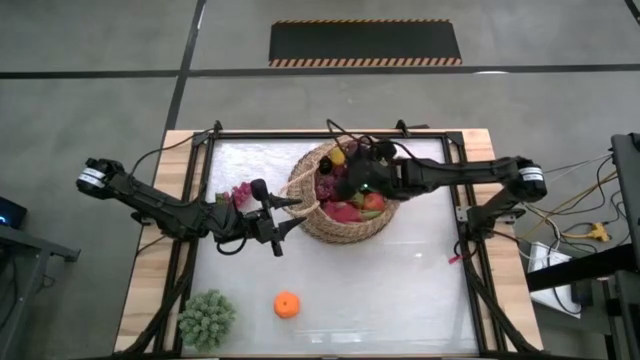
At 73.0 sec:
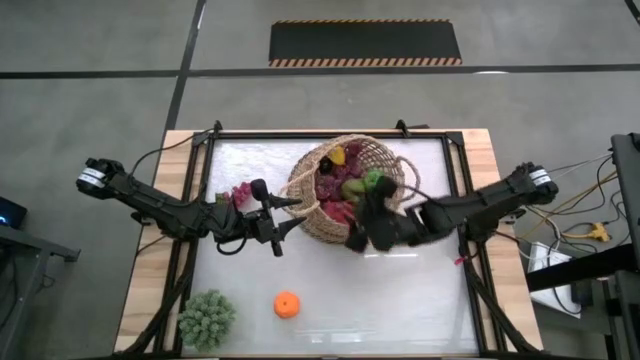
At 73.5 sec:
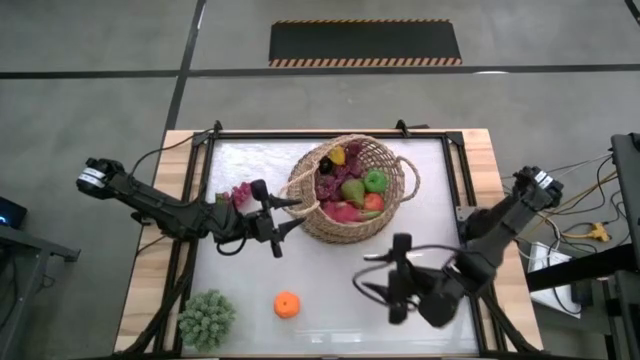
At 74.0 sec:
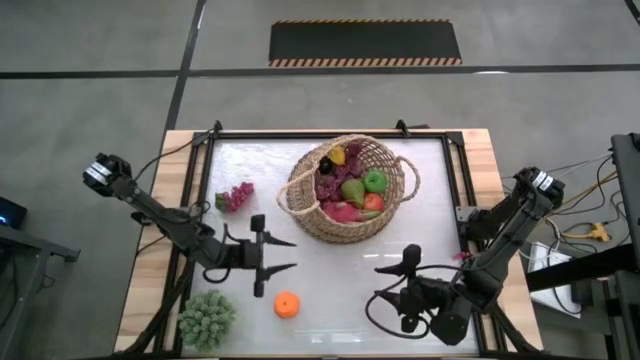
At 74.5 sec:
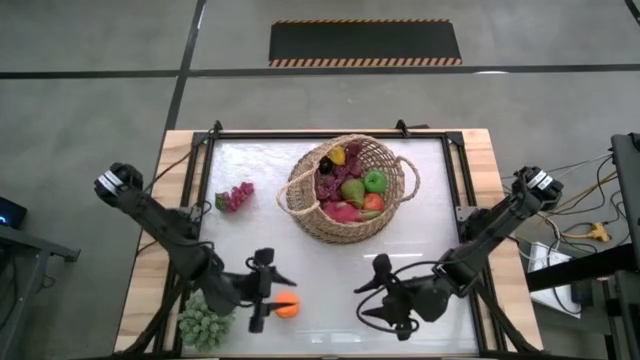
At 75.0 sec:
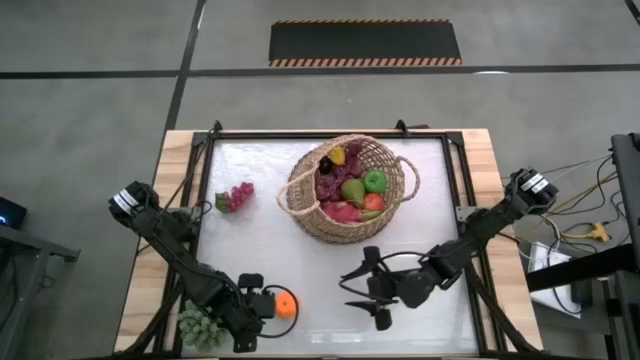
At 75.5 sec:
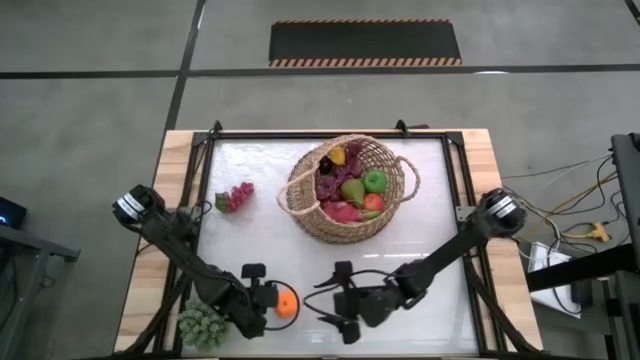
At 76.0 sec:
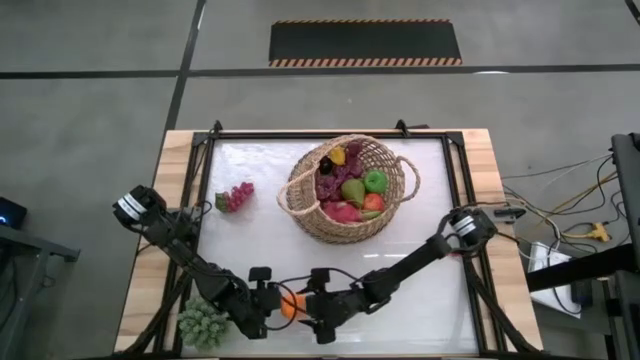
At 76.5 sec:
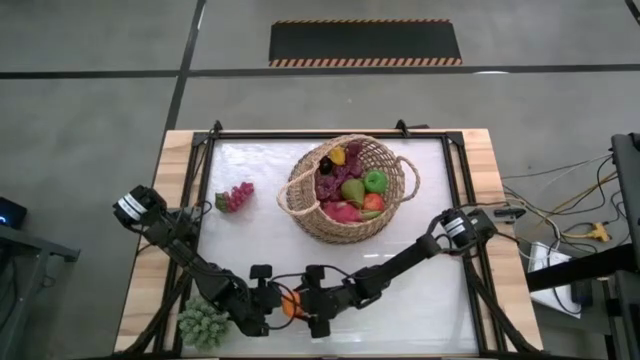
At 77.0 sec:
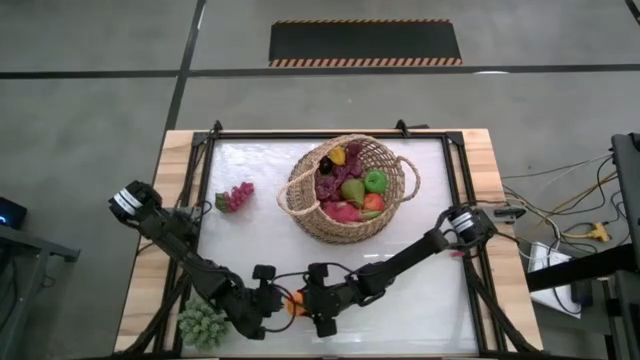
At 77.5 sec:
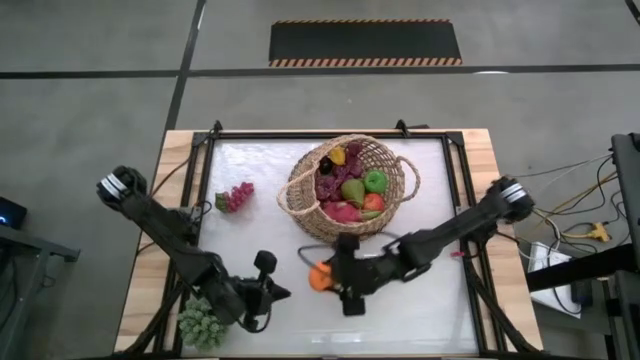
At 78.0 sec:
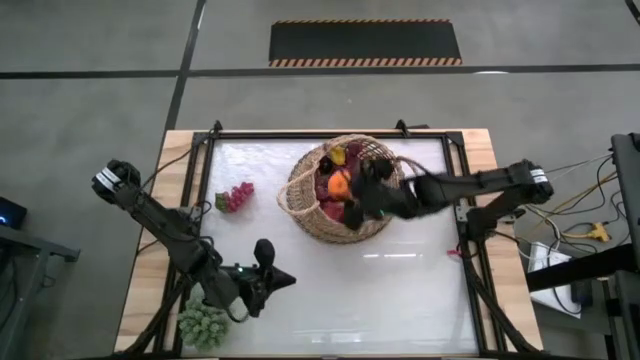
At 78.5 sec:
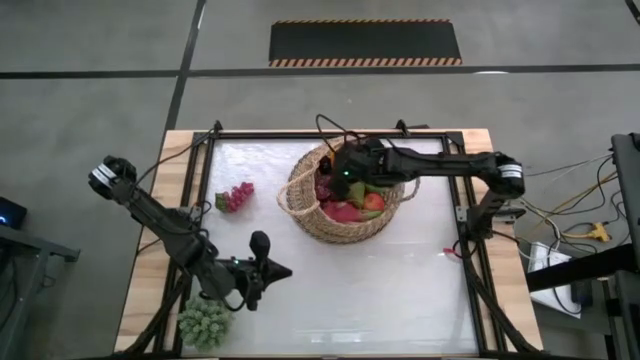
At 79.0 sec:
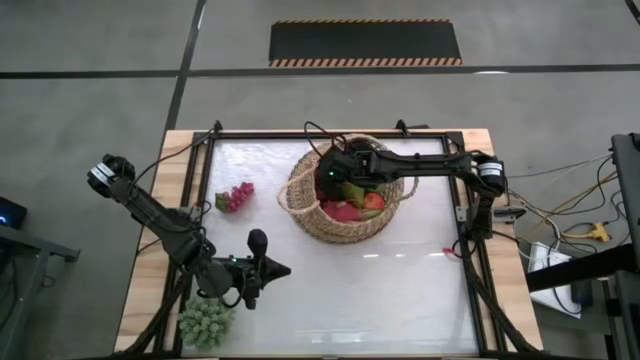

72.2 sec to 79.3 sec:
Task: Build produce basket
Put the orange into the brown basket

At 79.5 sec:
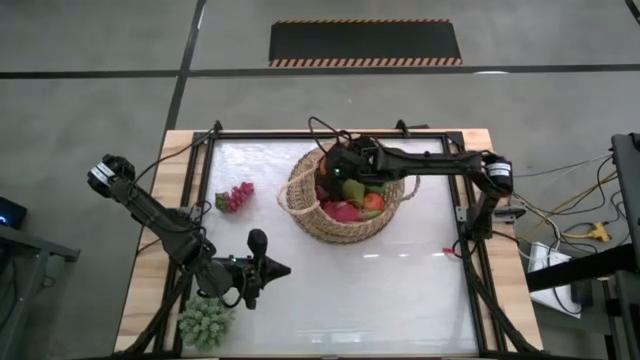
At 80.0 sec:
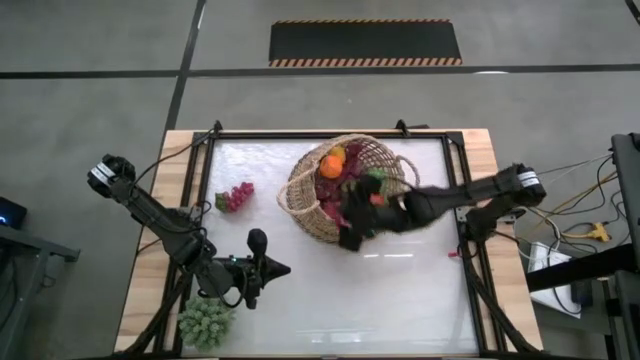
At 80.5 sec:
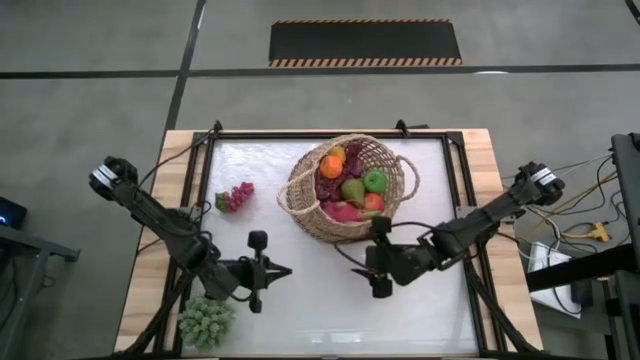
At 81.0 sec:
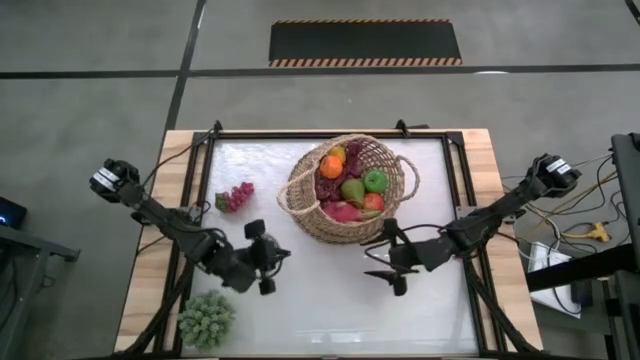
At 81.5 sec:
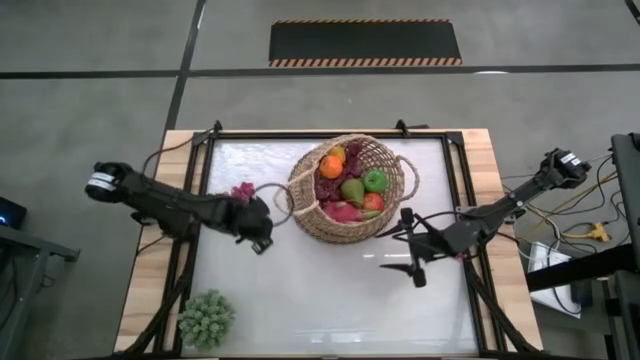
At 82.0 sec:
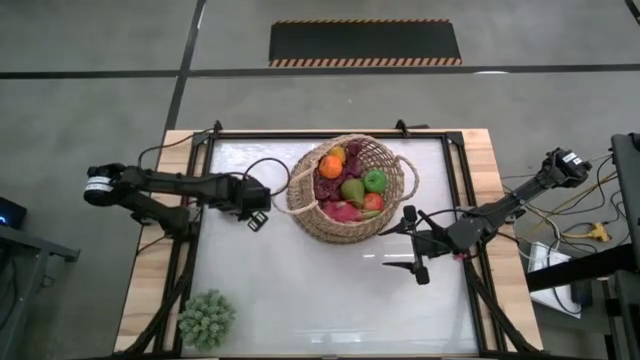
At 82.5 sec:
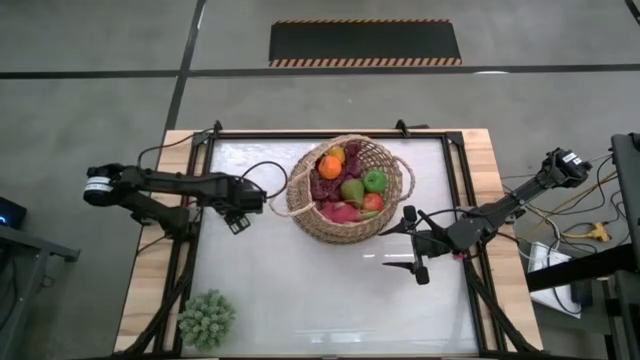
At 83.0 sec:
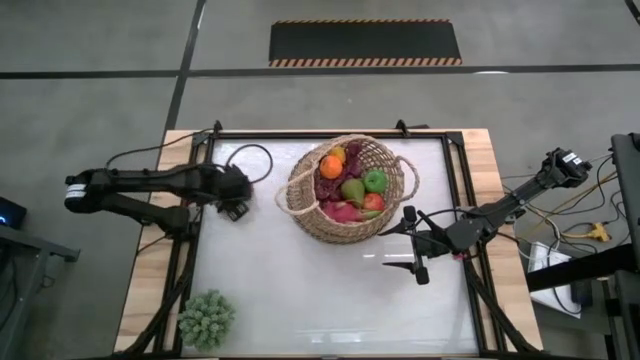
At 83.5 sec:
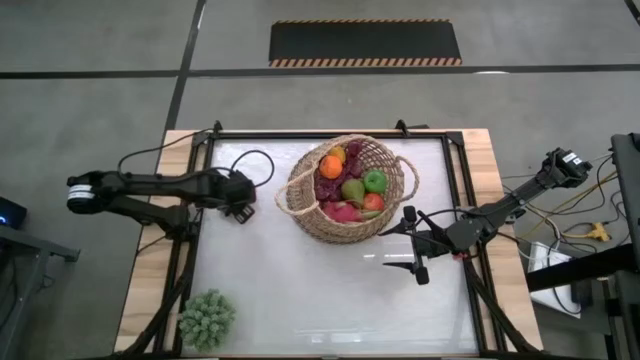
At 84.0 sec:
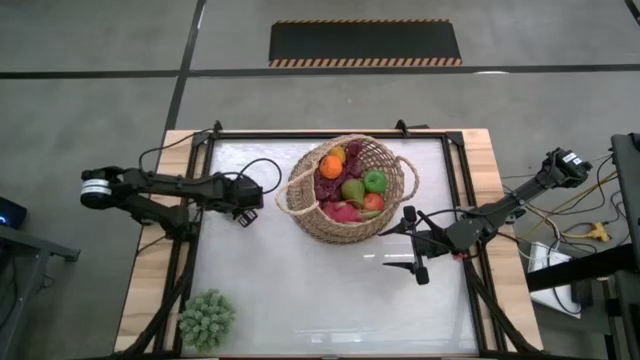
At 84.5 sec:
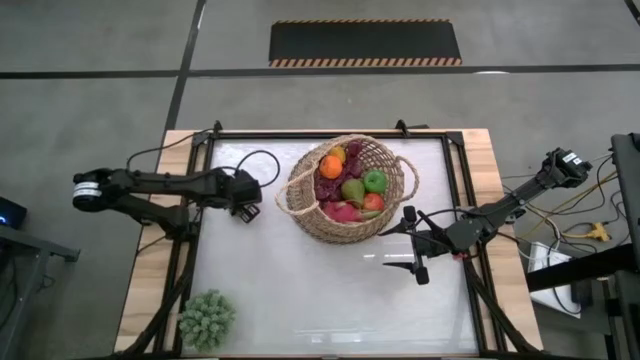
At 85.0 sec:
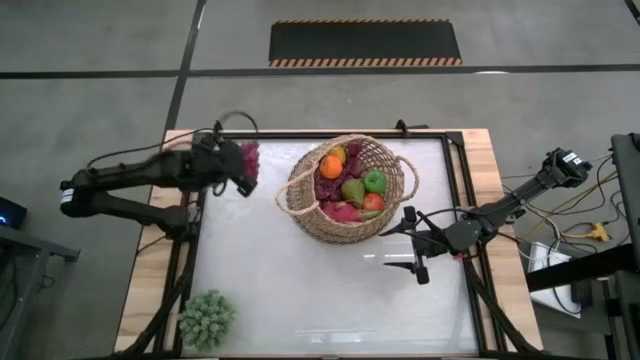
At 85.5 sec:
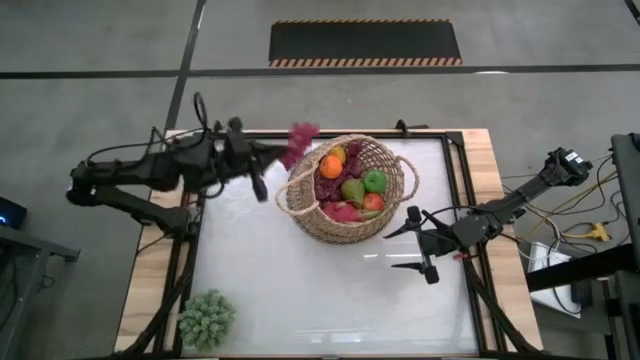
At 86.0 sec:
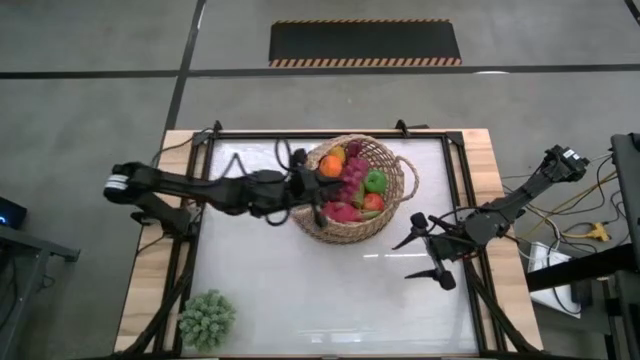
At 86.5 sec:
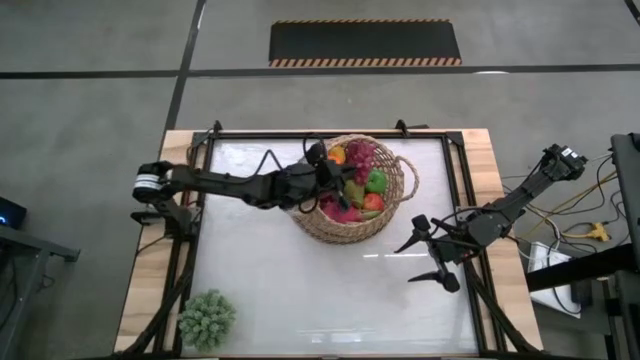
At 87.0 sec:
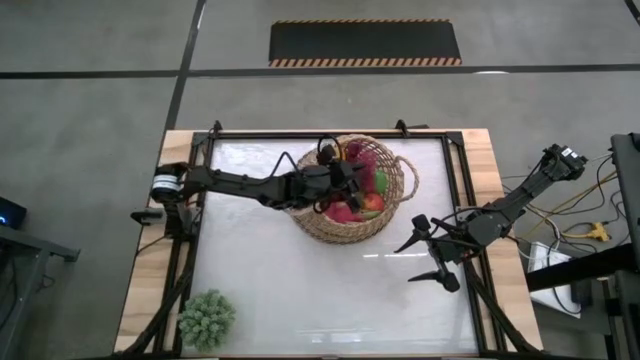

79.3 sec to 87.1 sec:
Put the purple grapes into the brown basket

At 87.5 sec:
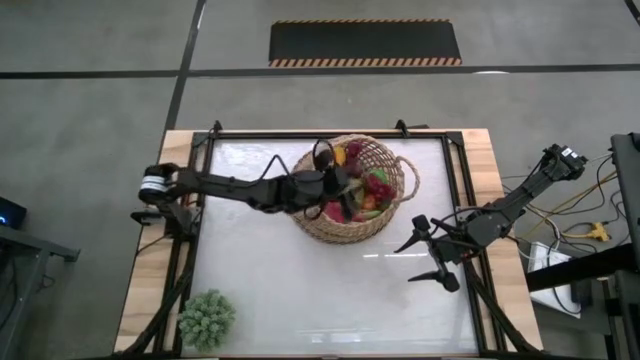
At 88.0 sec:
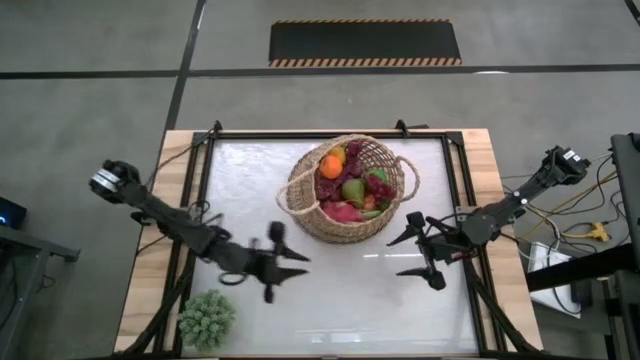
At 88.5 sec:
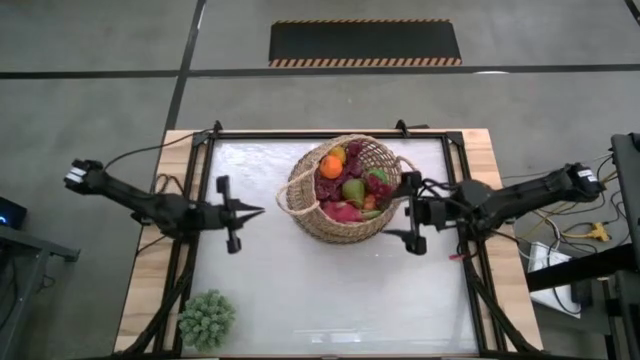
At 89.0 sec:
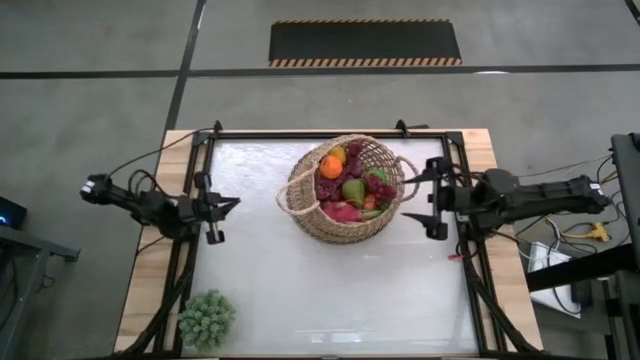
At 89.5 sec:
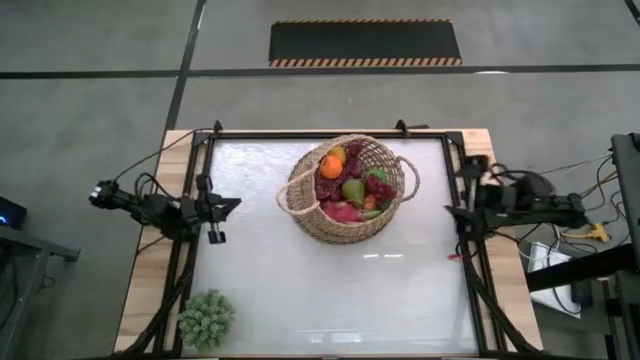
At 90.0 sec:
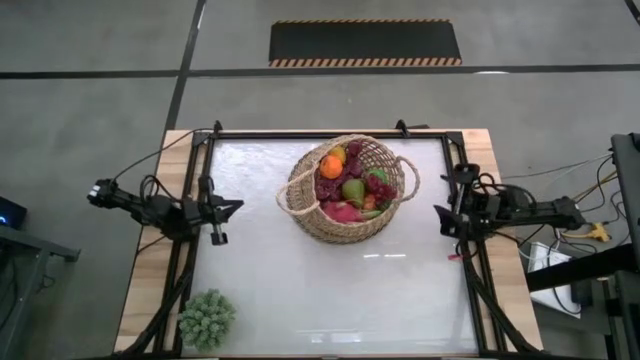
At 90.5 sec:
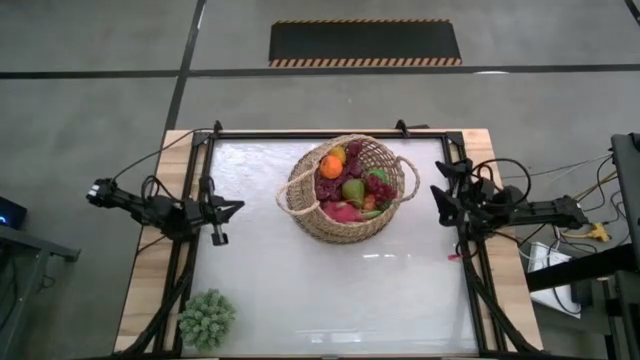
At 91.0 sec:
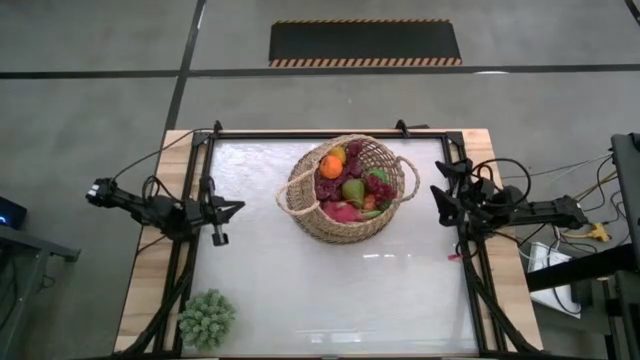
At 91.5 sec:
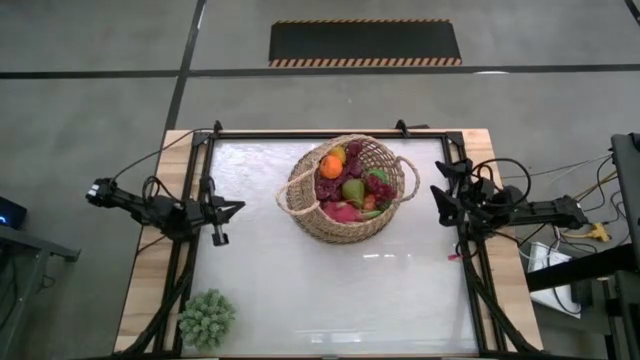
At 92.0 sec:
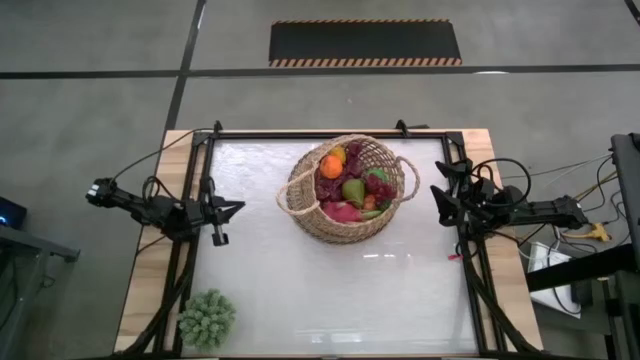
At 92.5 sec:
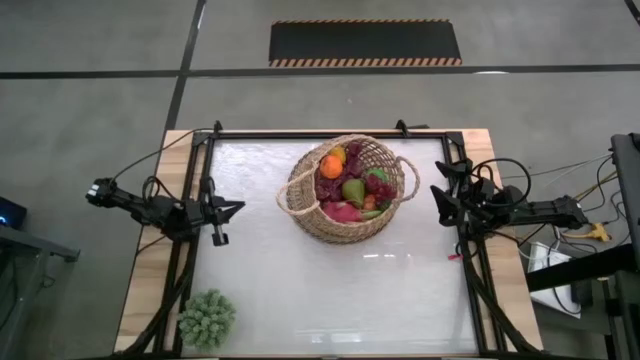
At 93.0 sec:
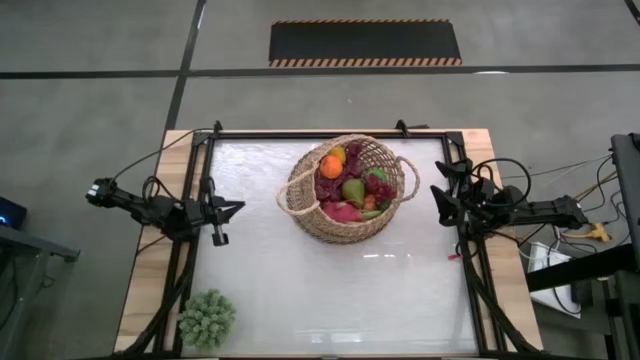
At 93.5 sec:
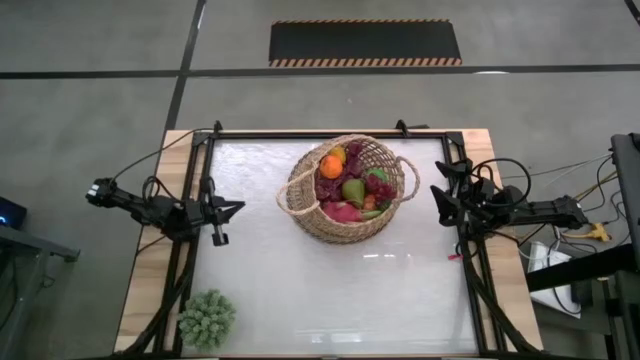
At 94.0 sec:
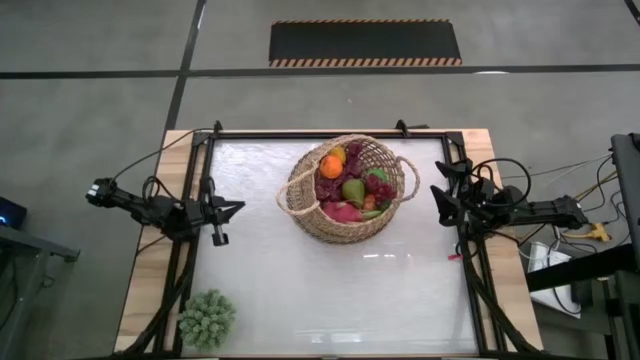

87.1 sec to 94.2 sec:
Return to Home Position
